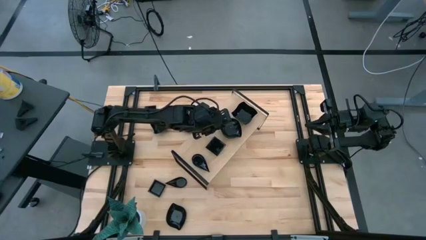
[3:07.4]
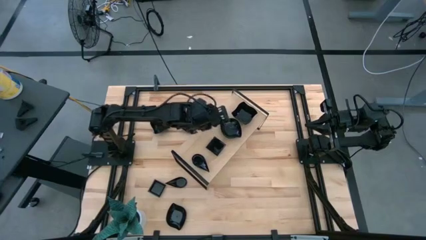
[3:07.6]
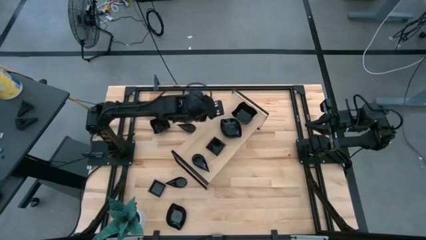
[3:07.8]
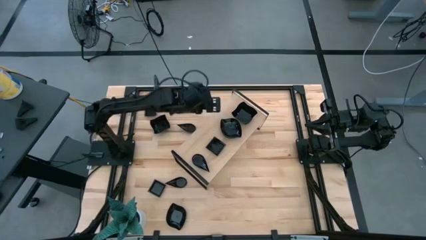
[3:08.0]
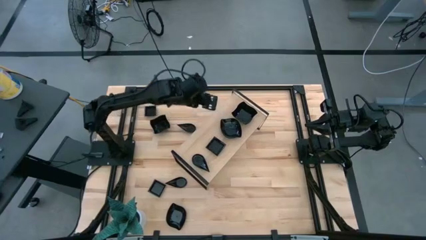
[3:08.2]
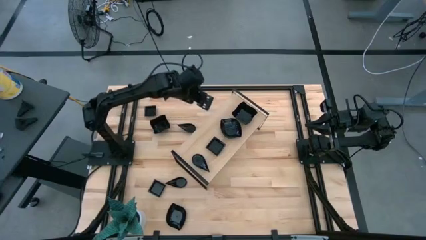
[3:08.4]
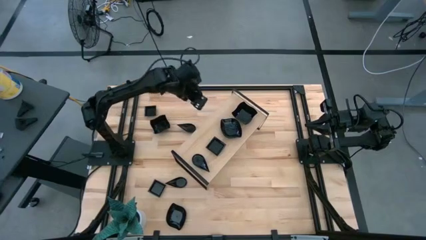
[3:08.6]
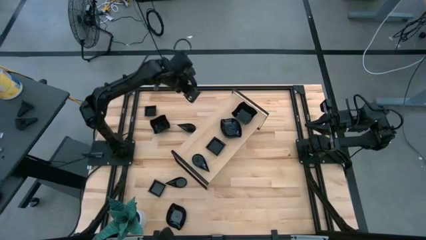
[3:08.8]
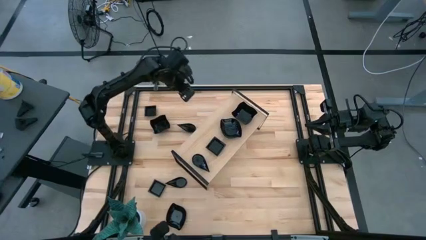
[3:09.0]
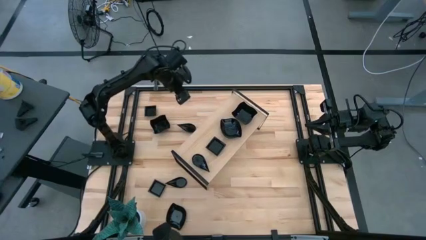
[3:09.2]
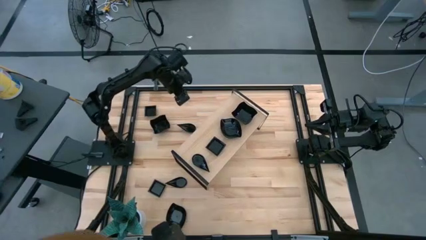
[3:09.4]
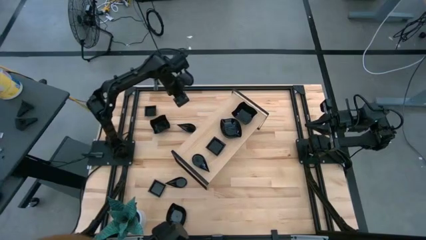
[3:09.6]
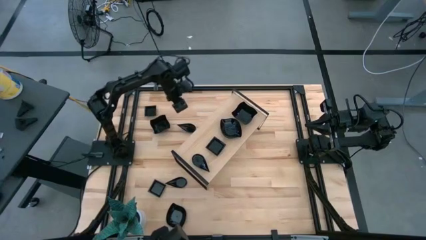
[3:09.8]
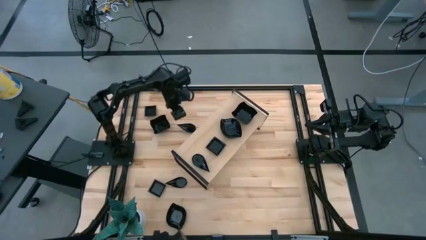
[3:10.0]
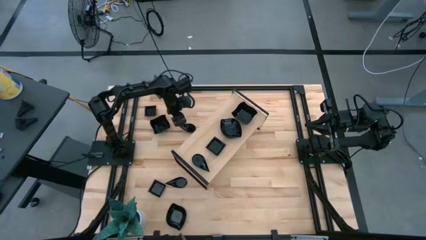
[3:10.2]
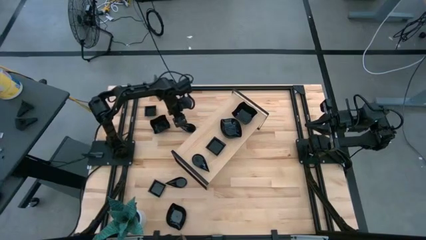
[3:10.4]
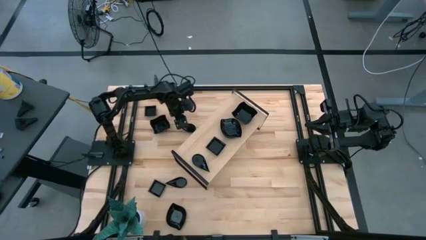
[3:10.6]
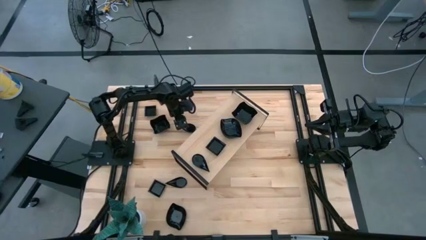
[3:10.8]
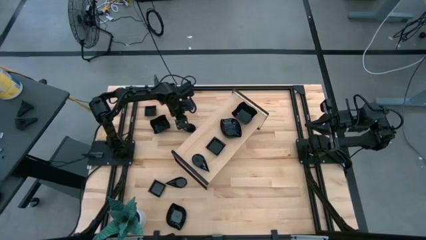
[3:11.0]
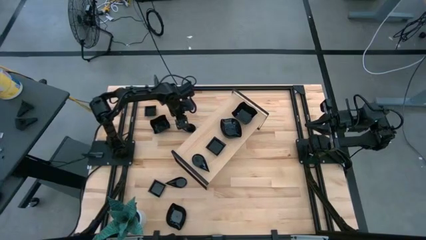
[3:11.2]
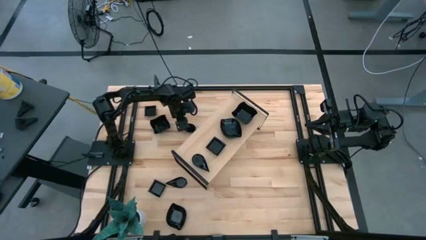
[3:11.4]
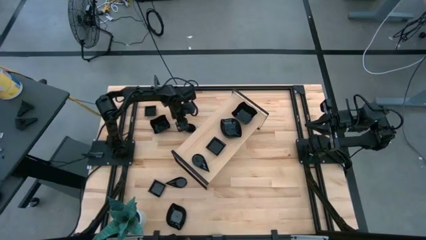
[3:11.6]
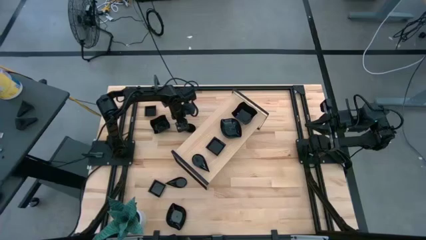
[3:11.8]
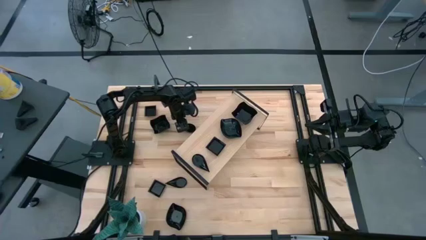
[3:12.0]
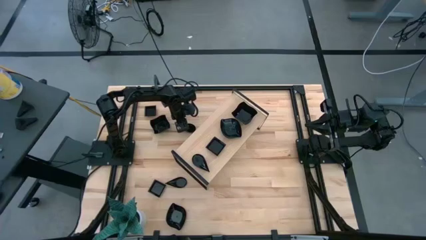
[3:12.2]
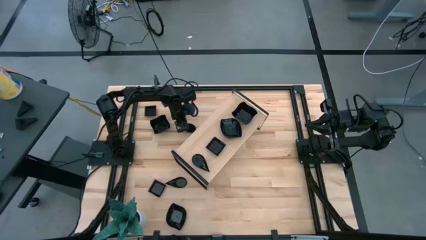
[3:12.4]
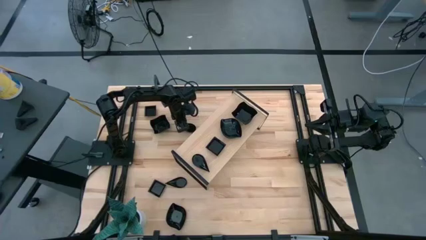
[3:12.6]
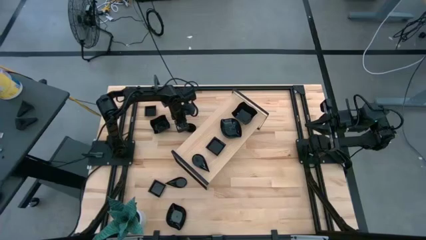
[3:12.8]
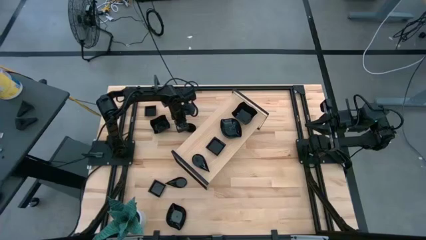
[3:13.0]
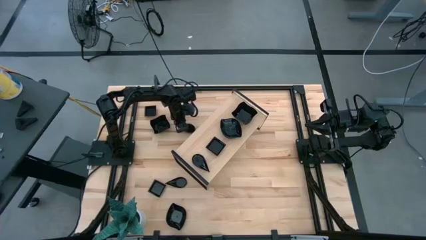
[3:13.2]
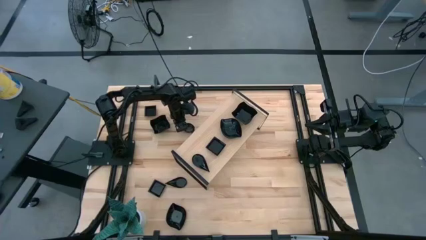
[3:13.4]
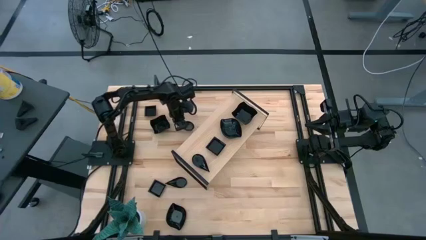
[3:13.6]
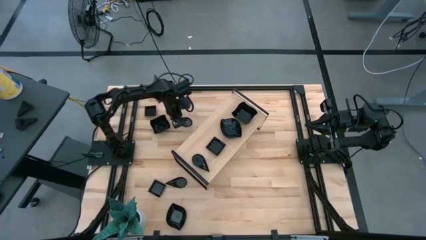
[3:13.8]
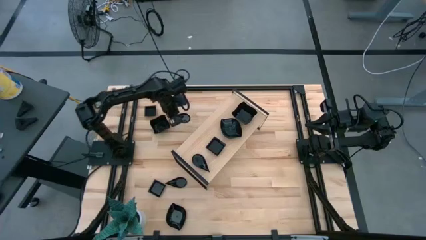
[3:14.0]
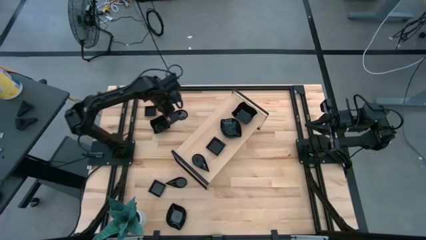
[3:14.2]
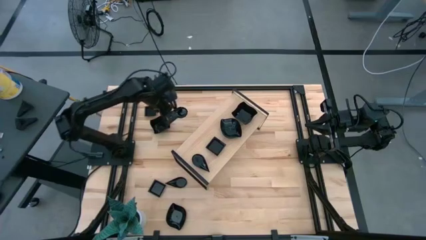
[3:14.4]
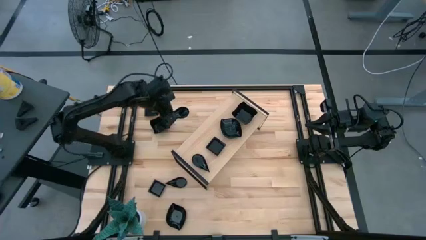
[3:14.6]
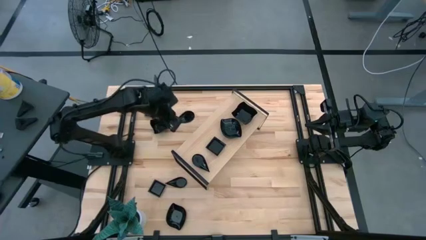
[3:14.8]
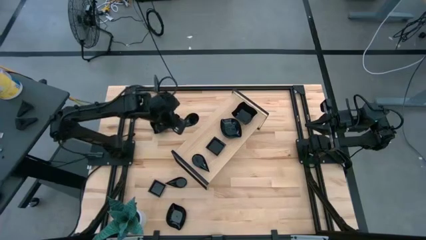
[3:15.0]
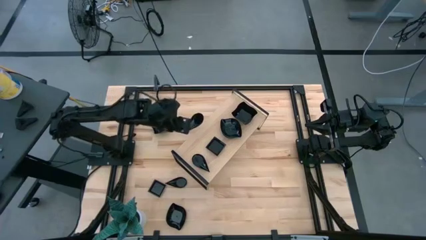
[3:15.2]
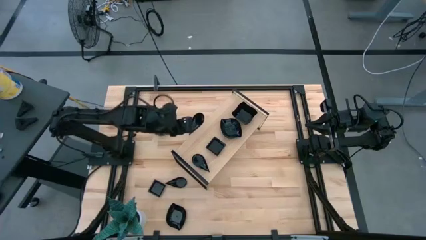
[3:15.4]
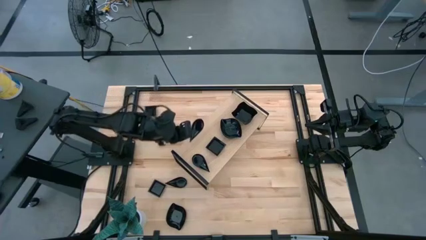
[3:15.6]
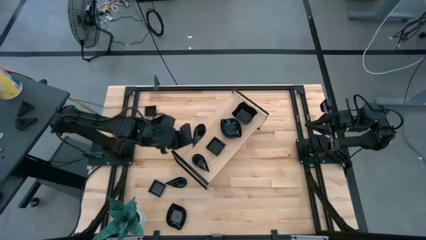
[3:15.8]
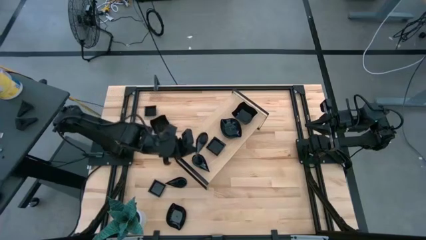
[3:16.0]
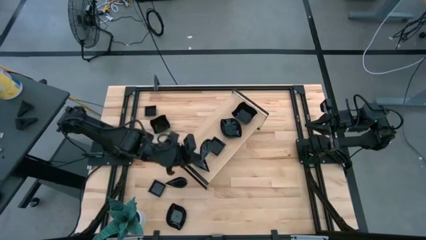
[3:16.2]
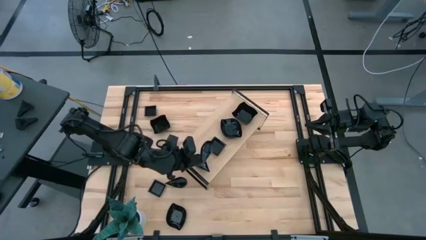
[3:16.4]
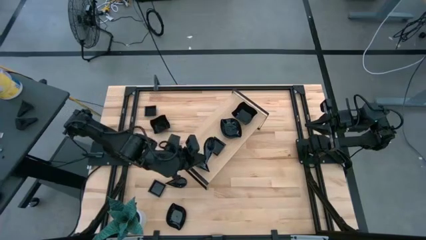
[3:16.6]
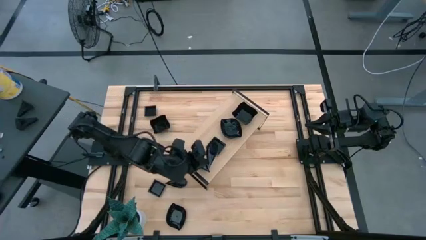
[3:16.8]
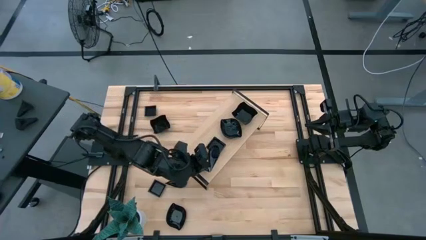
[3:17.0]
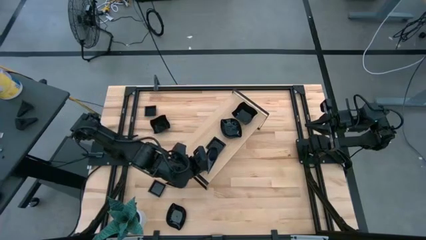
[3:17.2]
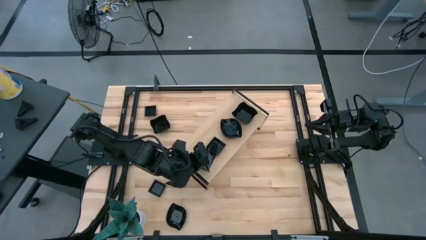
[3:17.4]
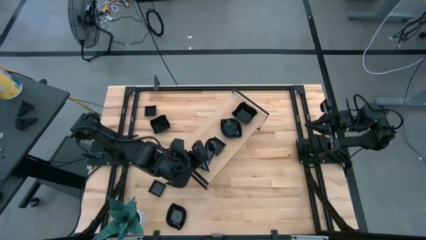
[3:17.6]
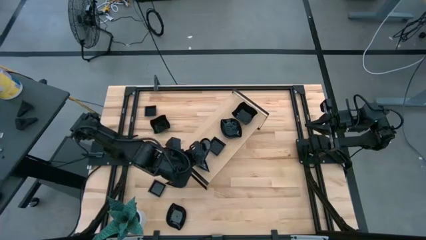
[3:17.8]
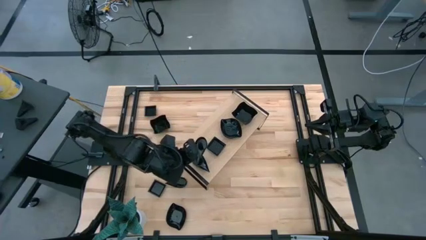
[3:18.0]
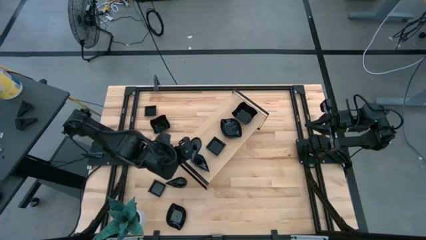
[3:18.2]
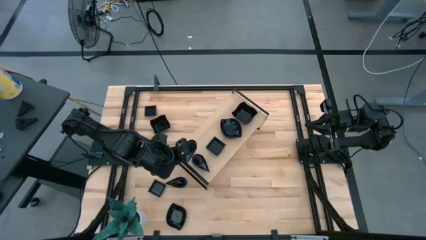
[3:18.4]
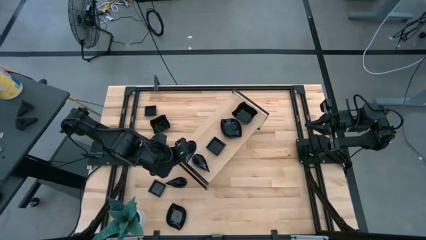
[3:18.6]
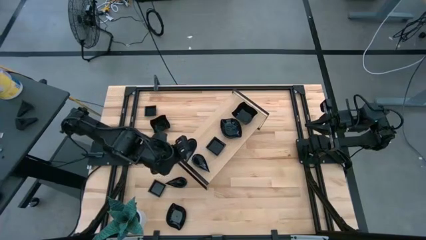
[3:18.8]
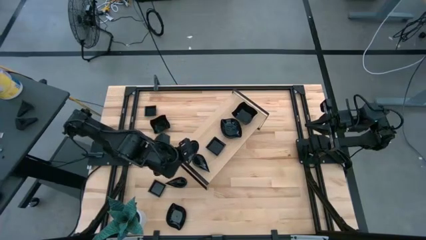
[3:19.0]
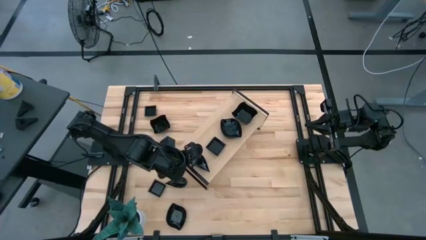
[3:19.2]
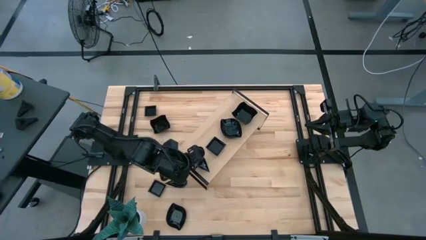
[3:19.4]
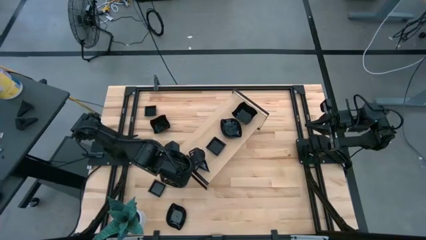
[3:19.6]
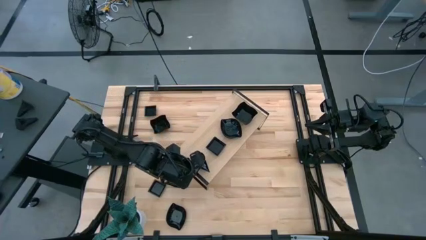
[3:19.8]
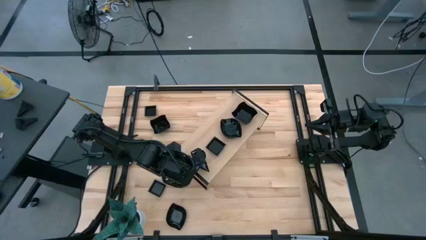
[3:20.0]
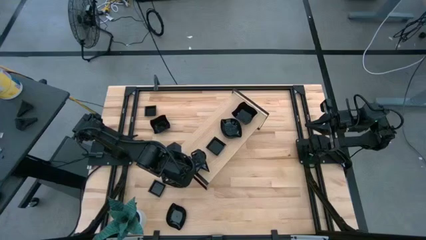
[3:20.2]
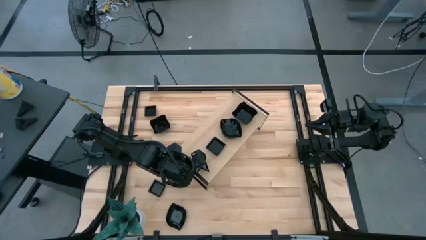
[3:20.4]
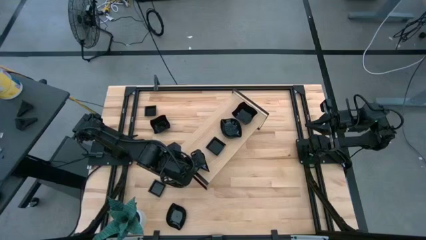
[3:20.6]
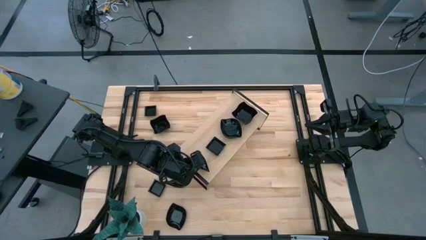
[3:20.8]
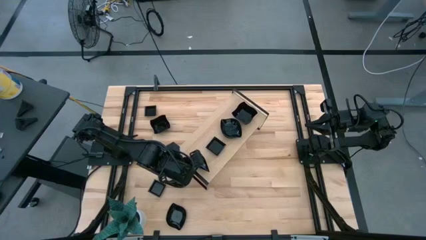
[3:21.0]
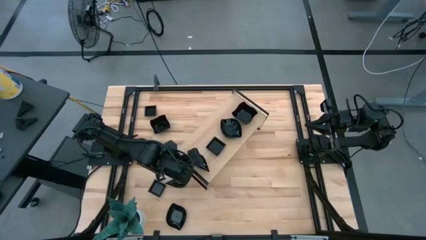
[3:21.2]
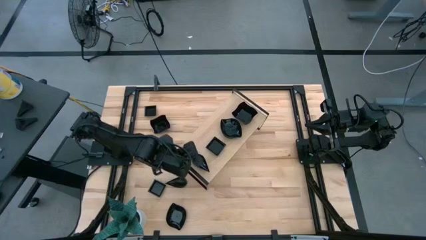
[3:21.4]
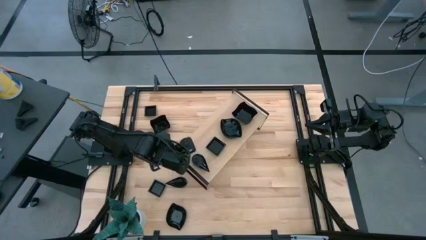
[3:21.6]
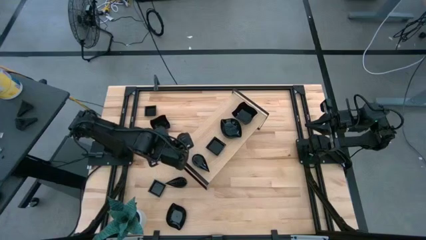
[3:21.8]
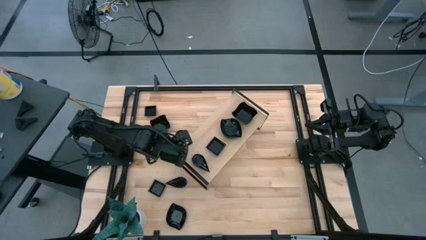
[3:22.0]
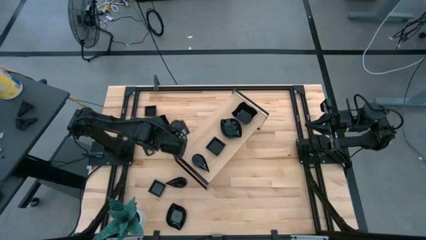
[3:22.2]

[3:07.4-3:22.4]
Task: Pick & Place Mini shaped plates
Stack the black teardrop shaped plate on top of the black teardrop shaped plate on the shelf
